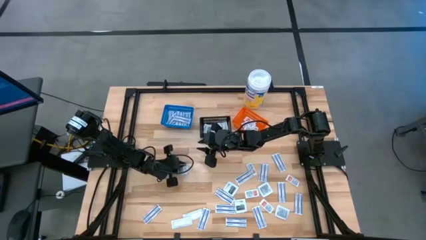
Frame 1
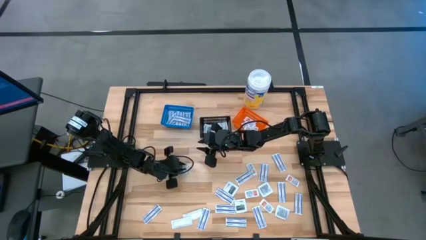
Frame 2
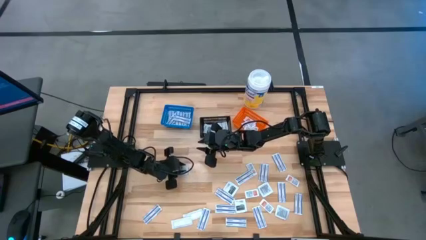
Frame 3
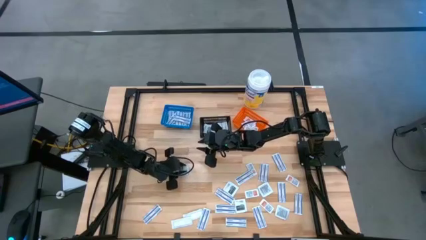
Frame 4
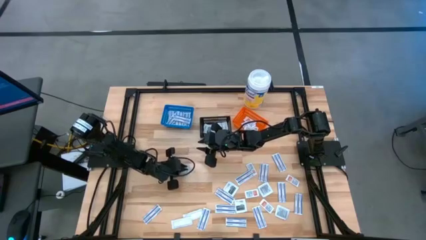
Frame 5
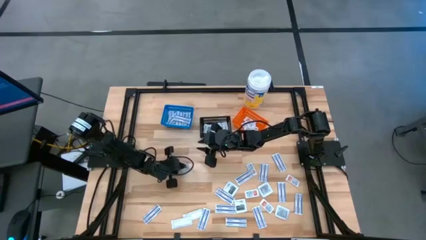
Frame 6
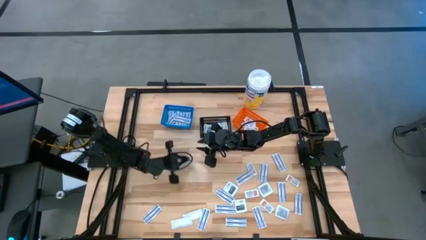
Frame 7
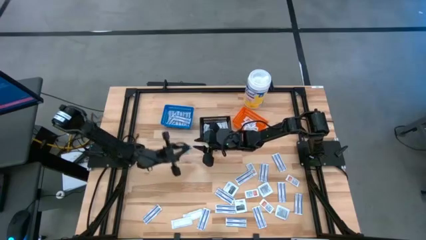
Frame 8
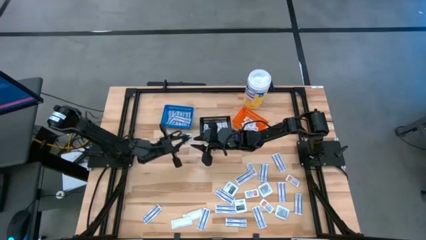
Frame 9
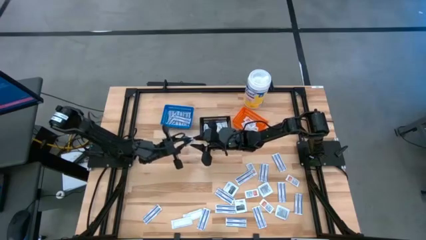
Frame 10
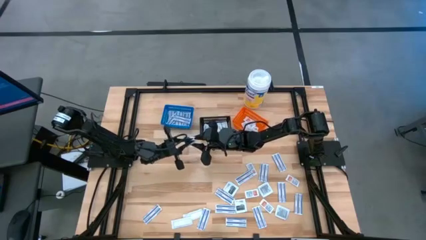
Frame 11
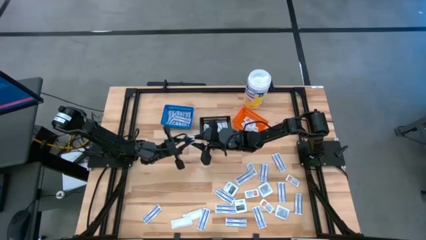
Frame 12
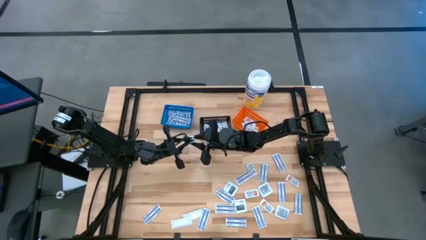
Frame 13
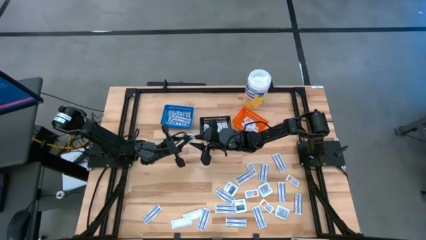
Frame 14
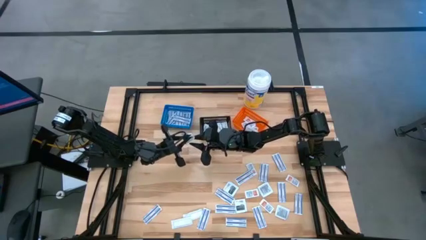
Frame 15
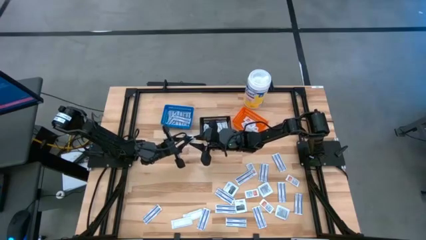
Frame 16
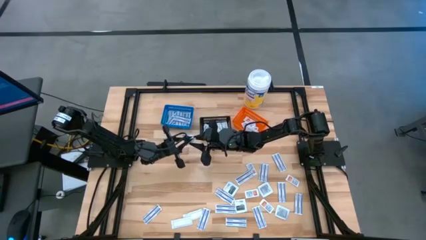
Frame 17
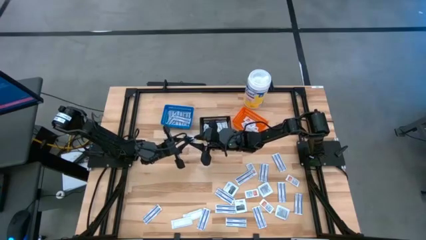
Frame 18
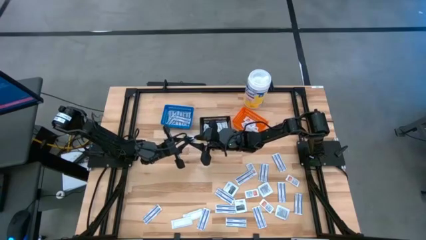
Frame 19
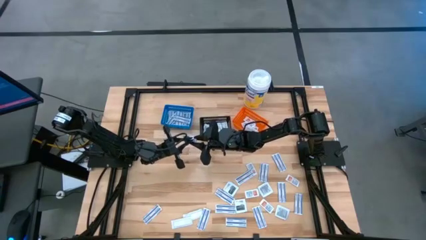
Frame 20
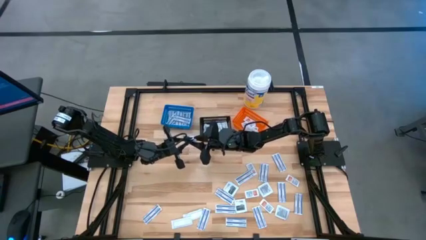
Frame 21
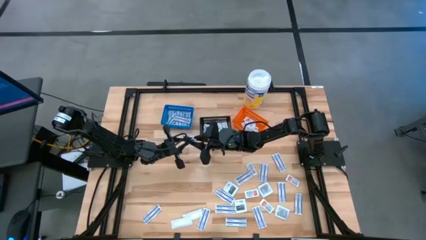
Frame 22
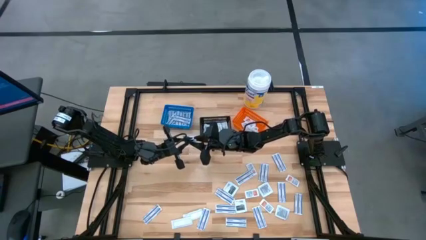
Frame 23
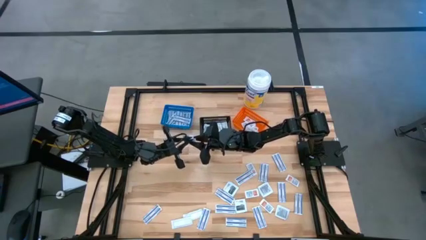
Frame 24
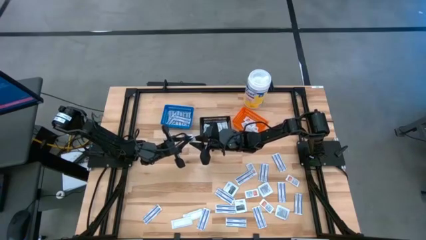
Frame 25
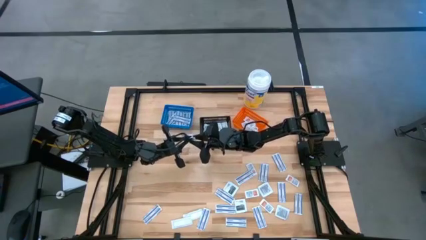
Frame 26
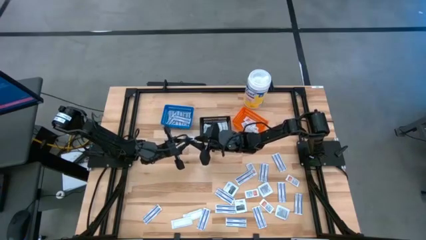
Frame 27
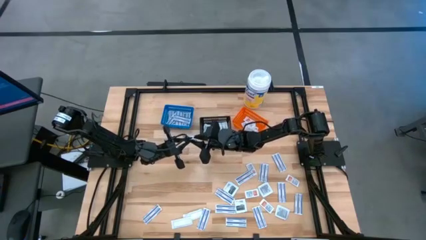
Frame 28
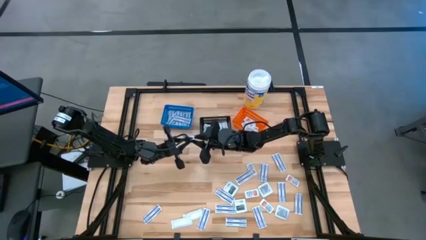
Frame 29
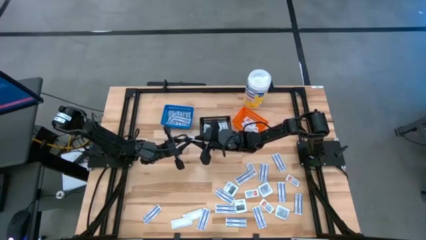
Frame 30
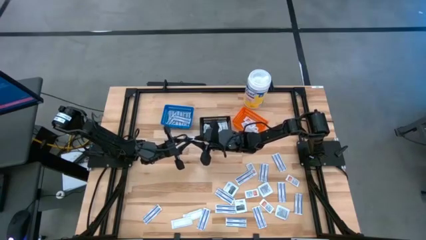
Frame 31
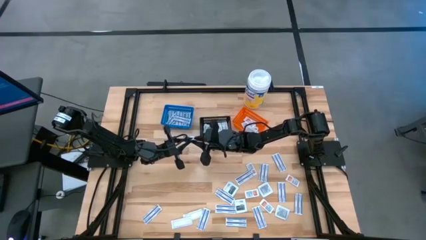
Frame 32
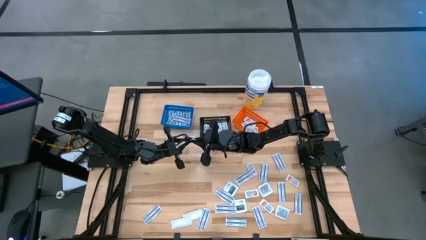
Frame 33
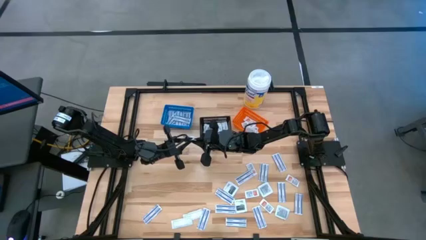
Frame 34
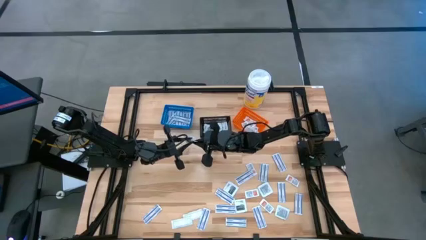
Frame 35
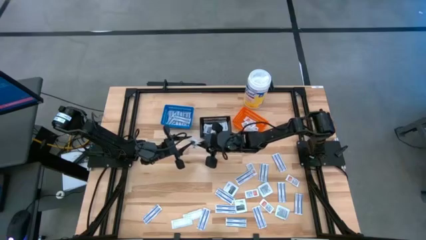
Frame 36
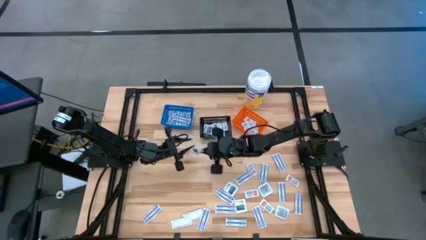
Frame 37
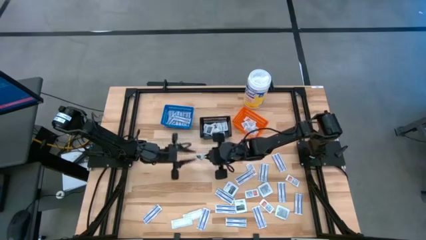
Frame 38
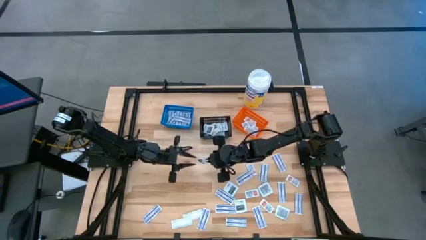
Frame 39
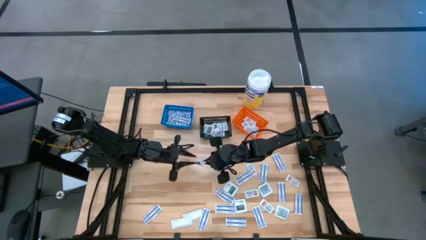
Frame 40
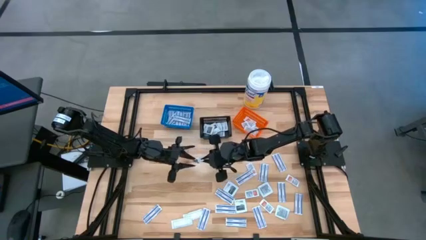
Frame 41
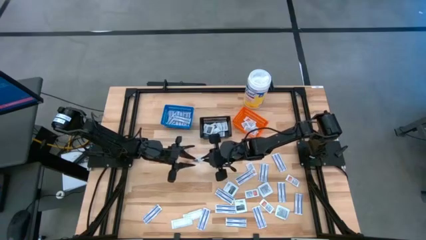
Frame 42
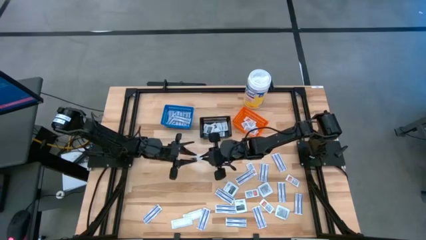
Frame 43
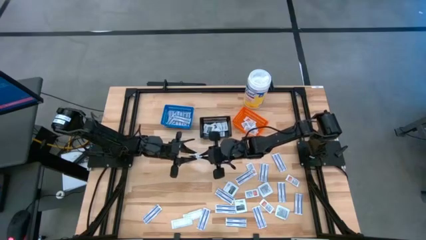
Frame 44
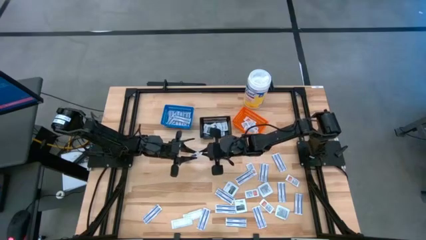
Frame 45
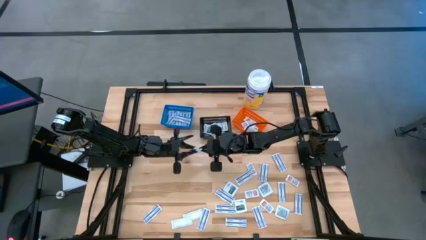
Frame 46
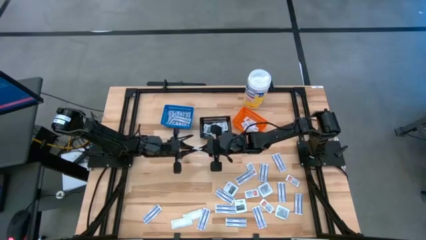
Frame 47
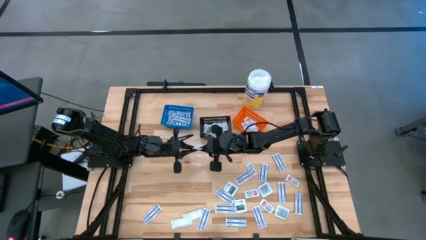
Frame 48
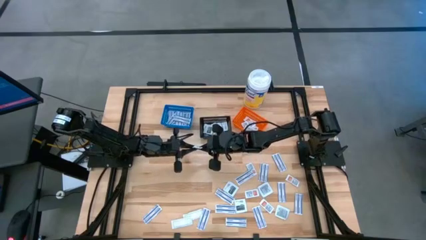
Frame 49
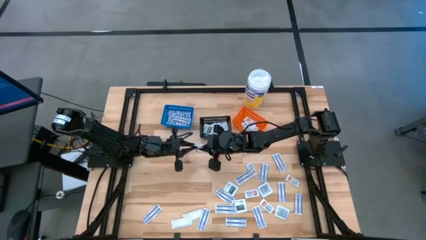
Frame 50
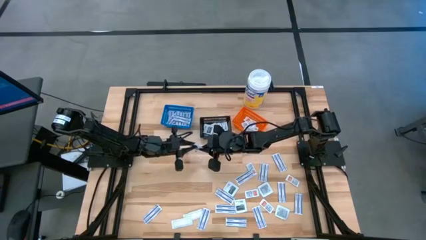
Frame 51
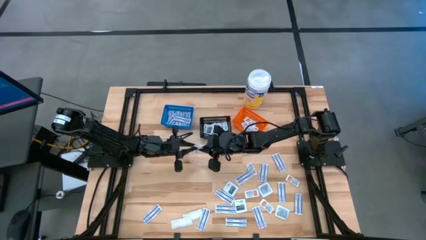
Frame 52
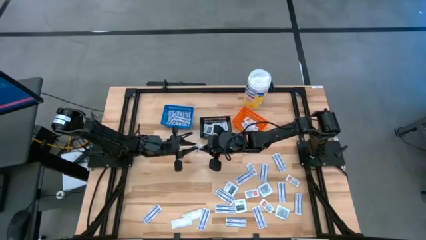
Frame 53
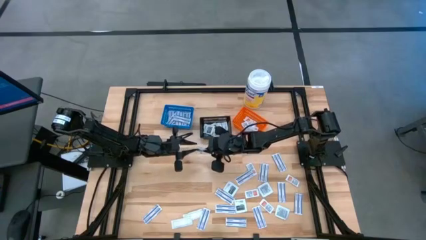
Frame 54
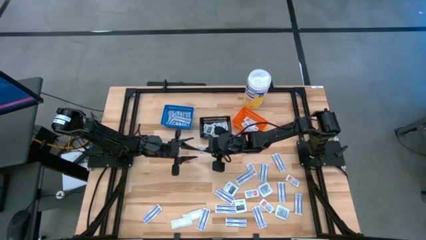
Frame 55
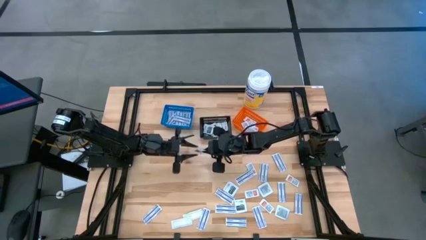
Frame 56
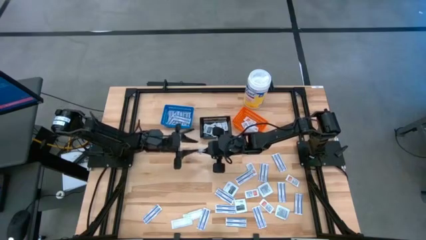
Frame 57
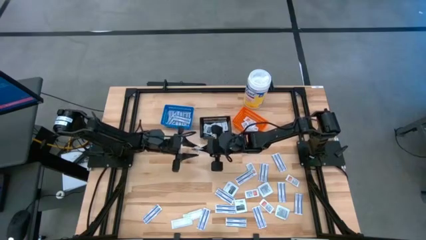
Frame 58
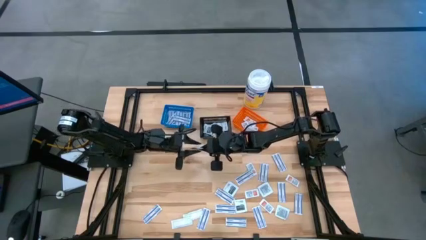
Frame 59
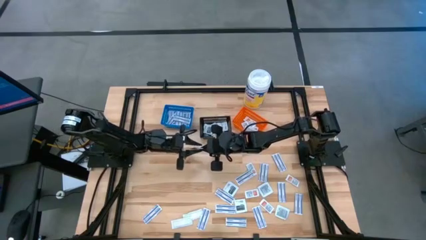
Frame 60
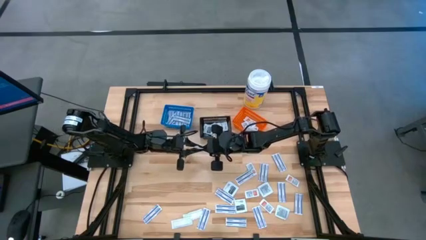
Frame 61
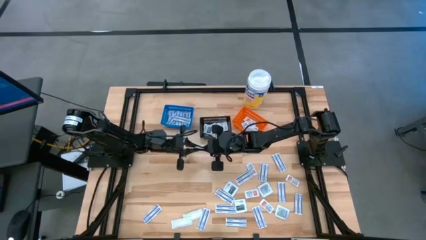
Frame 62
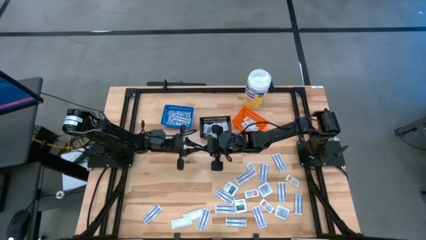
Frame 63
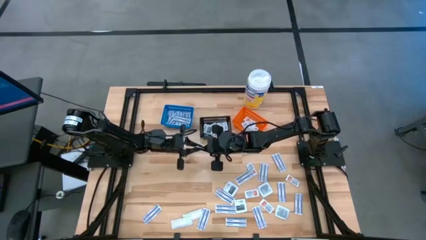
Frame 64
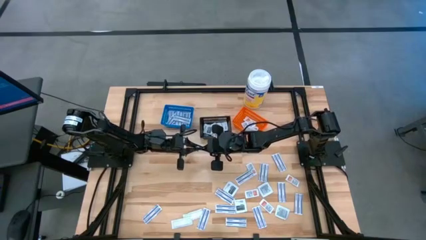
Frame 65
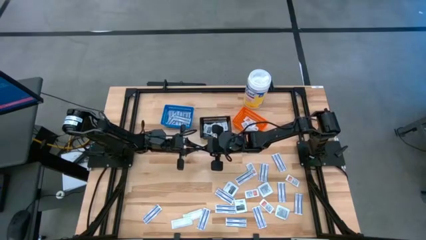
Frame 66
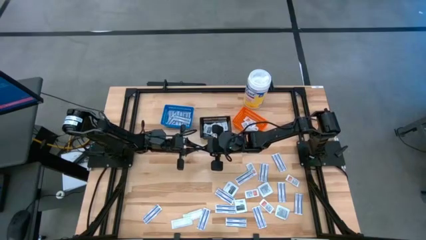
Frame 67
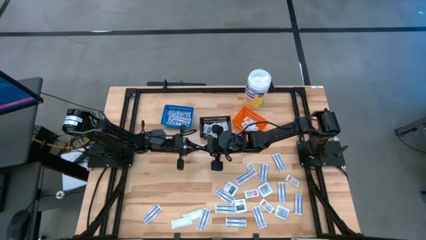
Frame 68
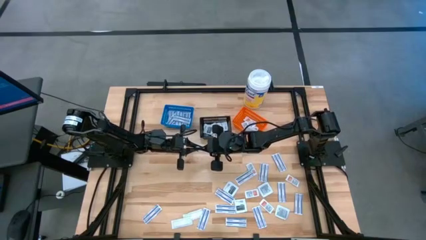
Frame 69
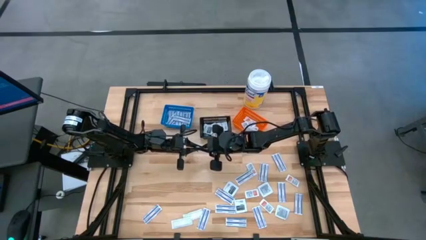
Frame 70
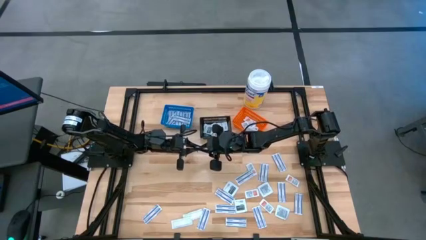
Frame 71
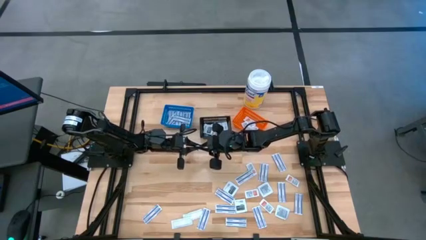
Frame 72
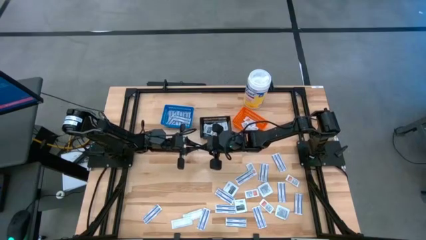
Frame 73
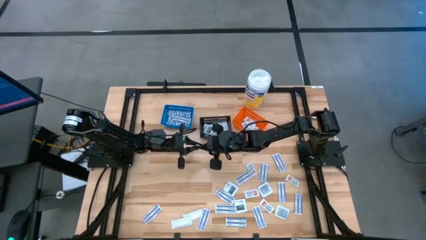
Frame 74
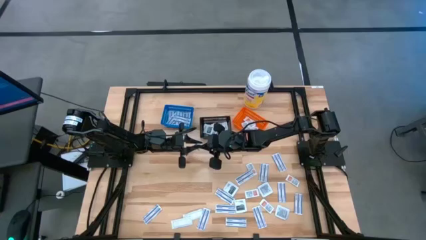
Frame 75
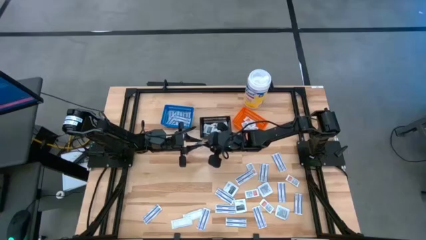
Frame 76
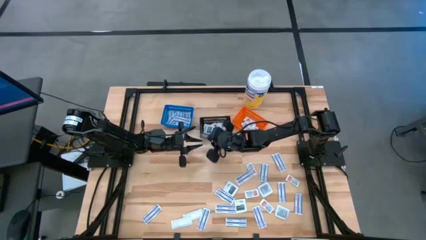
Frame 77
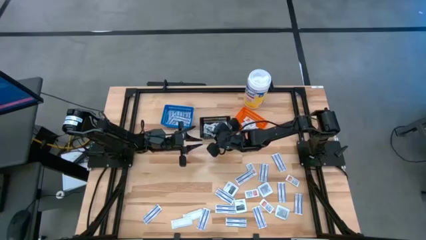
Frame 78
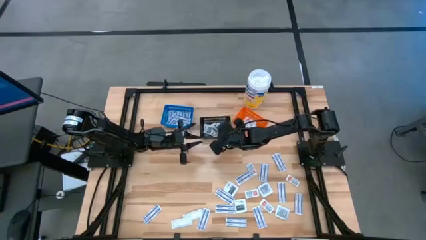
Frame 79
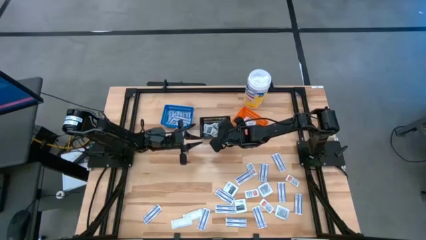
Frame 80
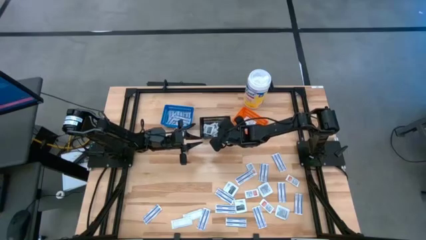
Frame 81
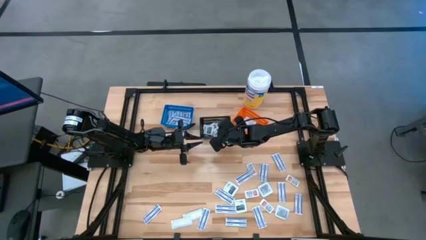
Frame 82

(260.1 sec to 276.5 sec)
Task: Pick & Place First Aid Supplies
Put the towelette pack into the black bin
